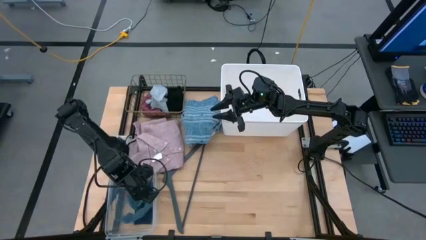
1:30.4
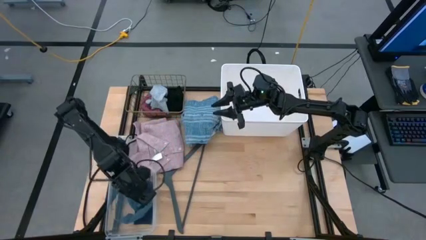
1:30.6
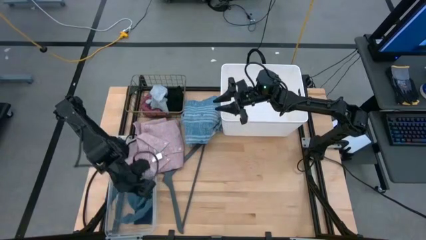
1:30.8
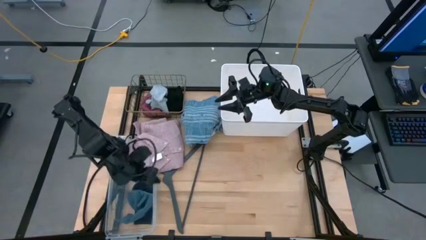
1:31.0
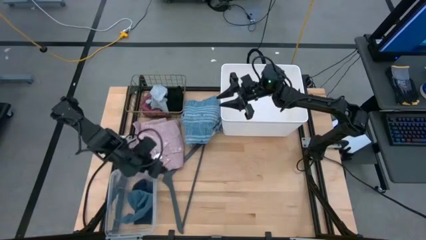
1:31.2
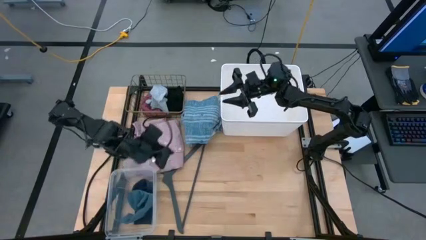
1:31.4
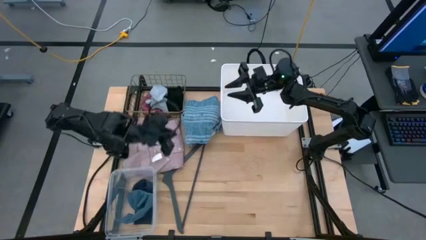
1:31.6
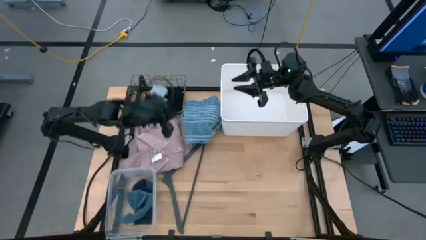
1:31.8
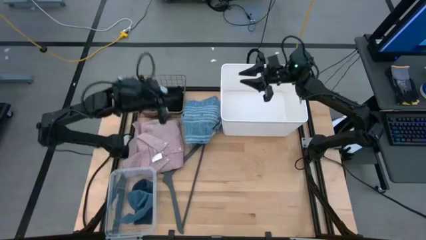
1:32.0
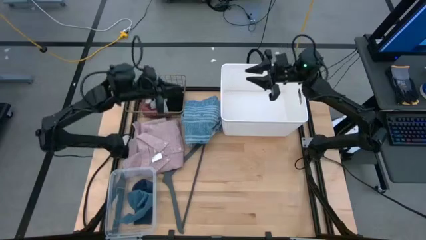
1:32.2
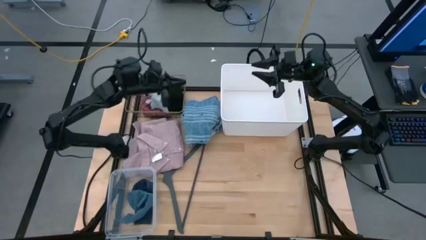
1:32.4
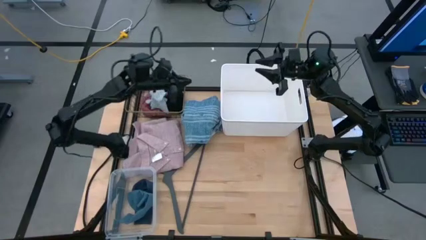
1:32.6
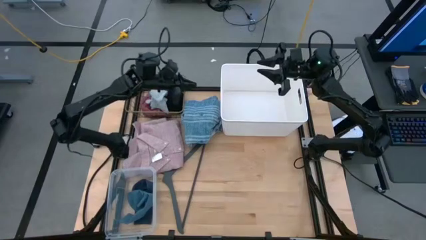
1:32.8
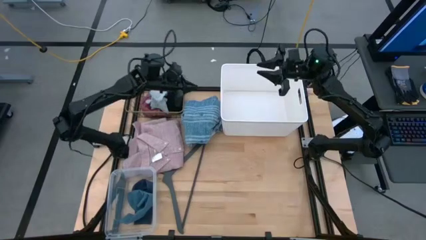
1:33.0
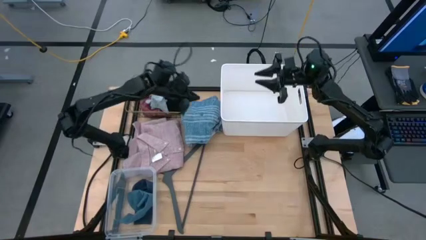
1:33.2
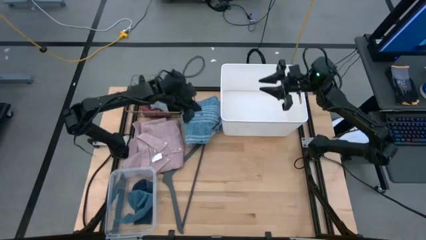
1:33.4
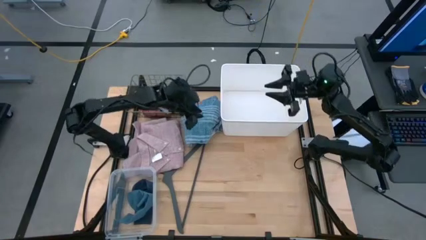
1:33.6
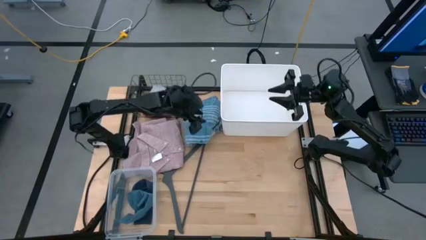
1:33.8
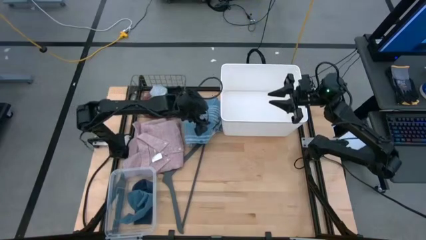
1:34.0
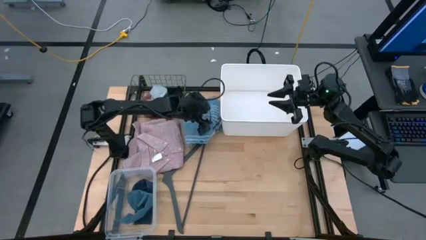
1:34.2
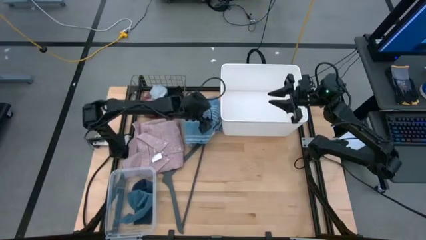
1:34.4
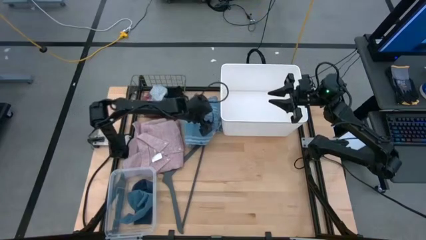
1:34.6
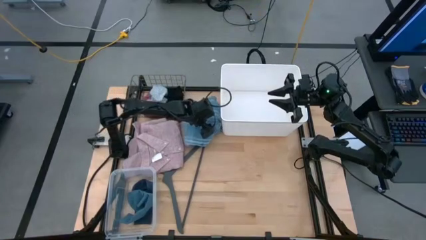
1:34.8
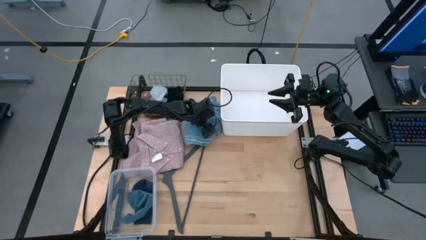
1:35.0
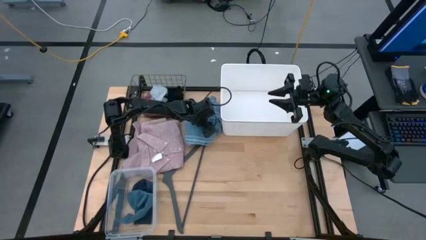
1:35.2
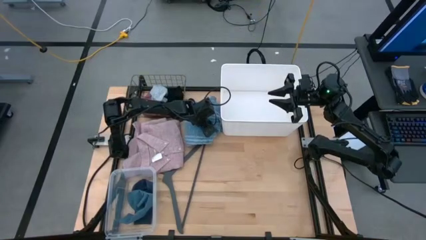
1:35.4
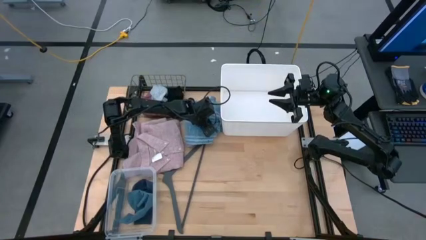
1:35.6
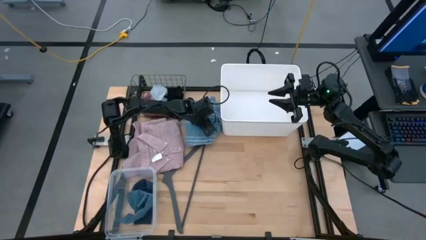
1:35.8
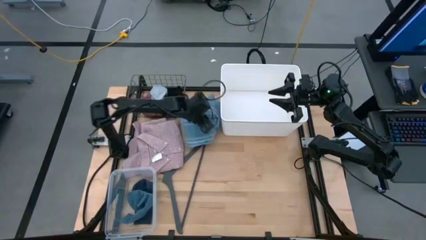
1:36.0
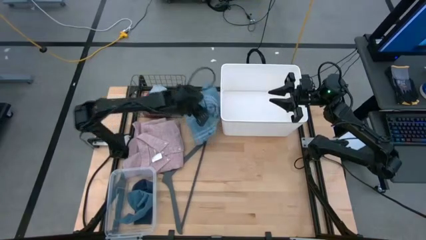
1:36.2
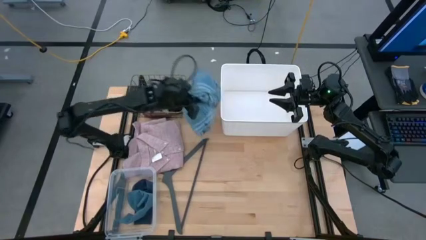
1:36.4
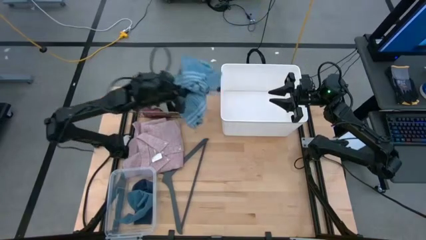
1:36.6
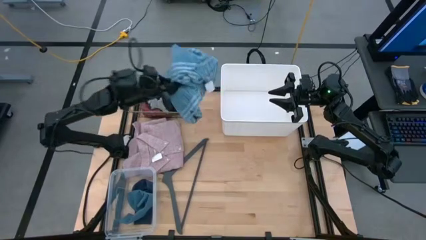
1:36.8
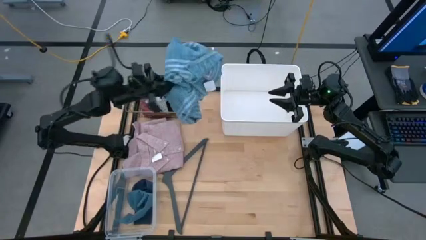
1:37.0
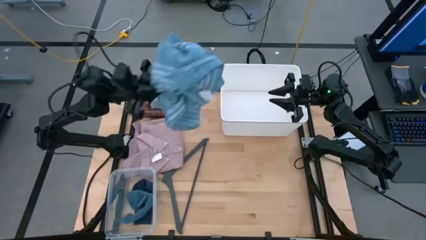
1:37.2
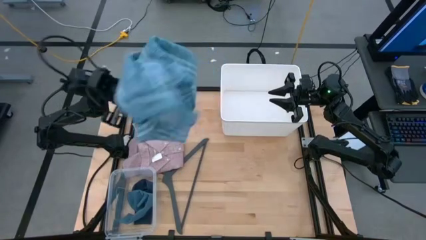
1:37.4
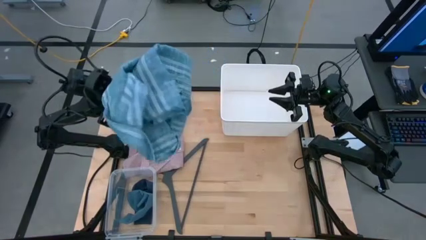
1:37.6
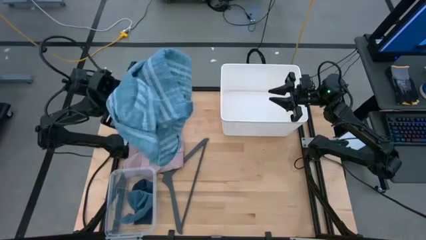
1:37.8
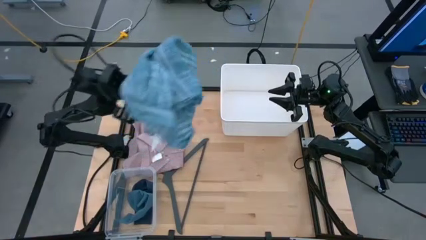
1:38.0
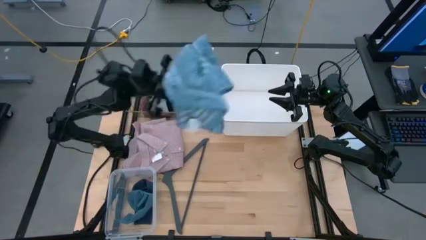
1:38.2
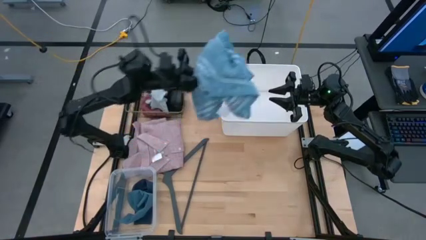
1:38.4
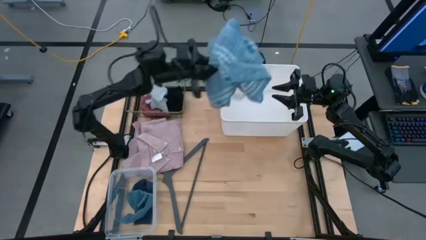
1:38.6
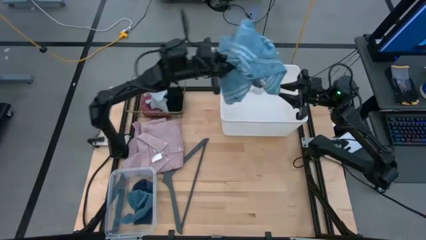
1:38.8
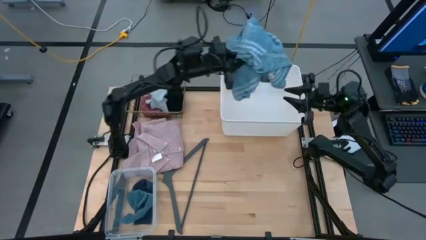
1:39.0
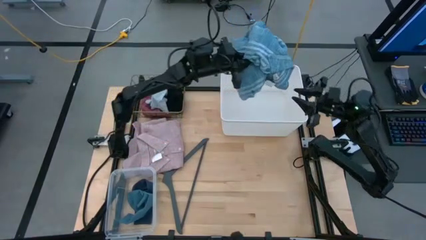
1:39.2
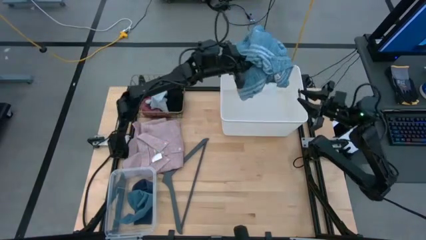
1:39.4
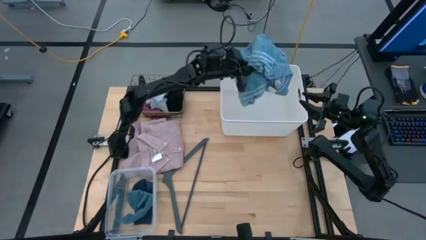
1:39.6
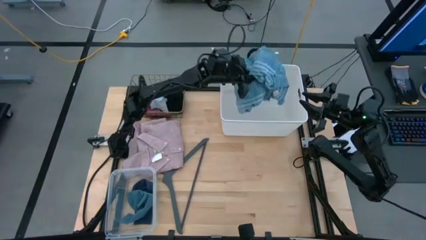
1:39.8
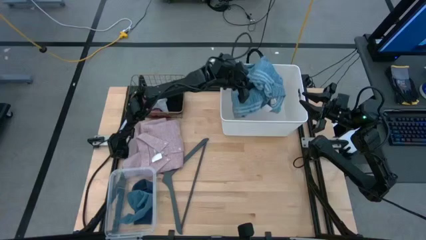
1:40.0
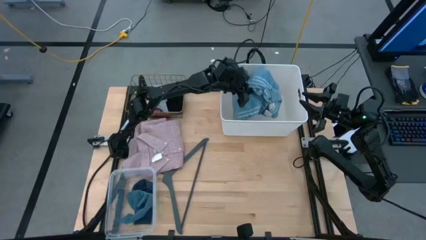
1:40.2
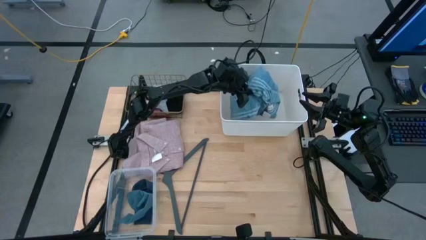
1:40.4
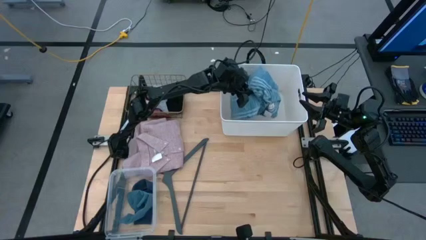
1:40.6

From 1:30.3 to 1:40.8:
Task: Pick & Place Cloths
Put the blue shirt into the white bin
